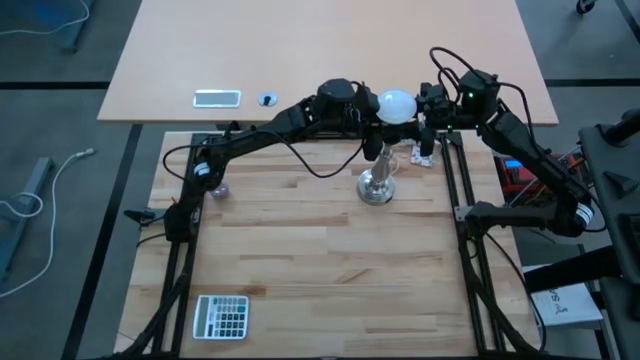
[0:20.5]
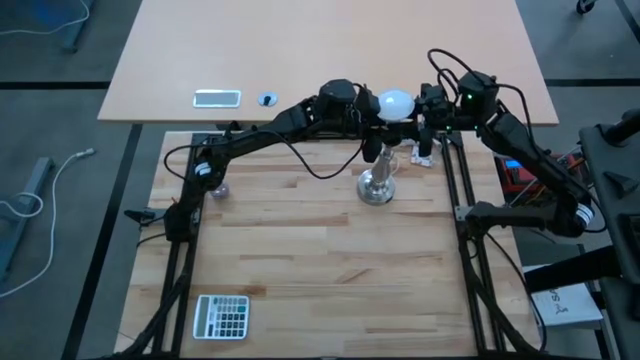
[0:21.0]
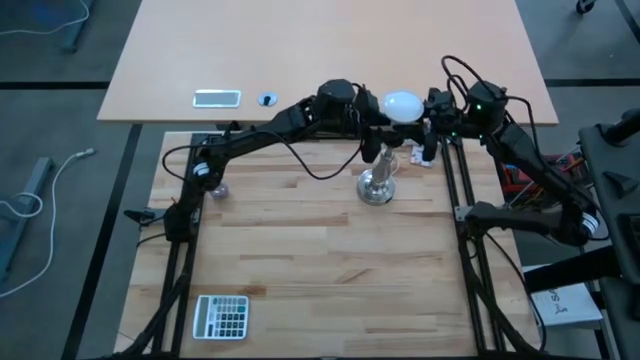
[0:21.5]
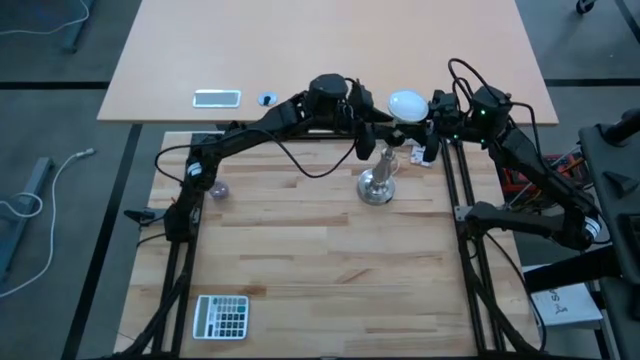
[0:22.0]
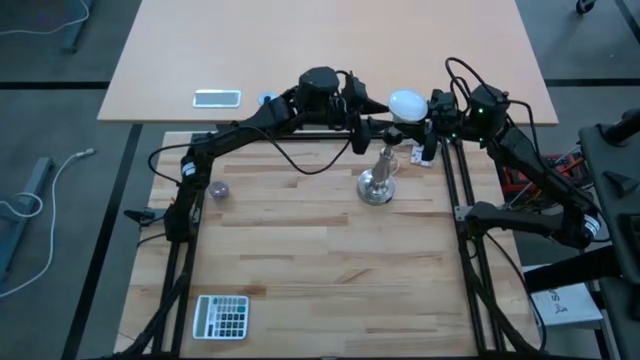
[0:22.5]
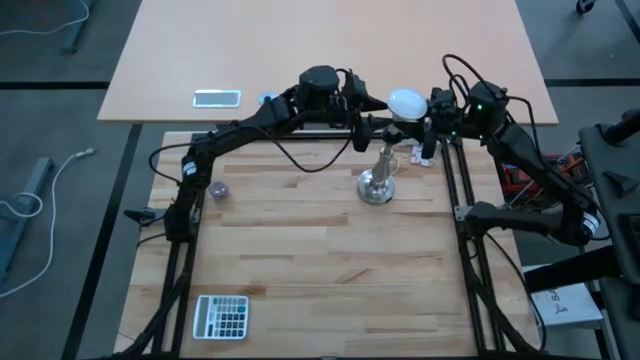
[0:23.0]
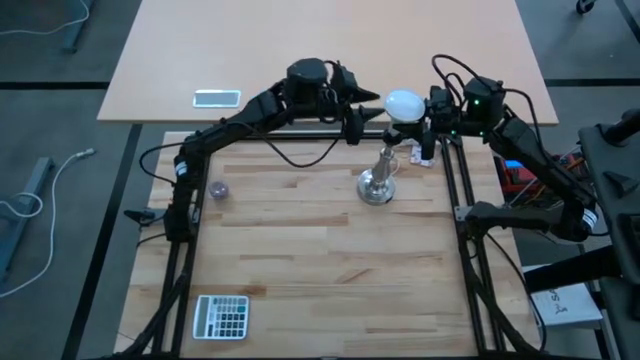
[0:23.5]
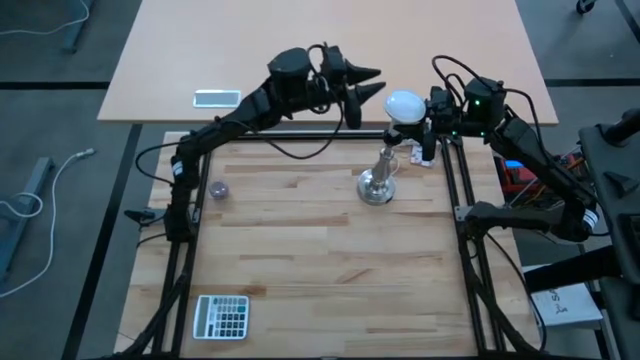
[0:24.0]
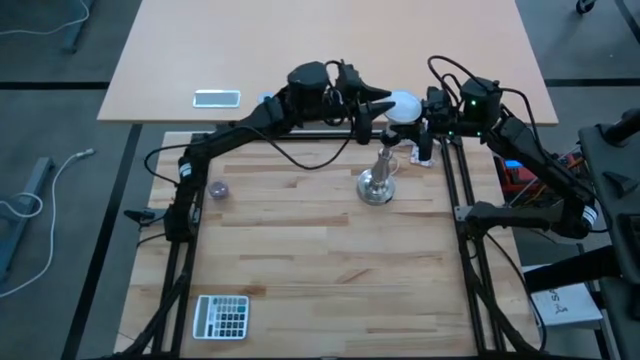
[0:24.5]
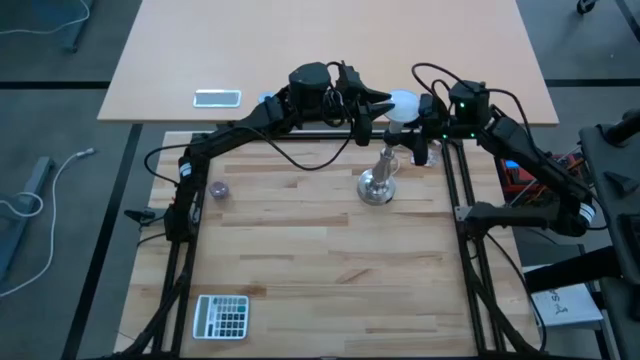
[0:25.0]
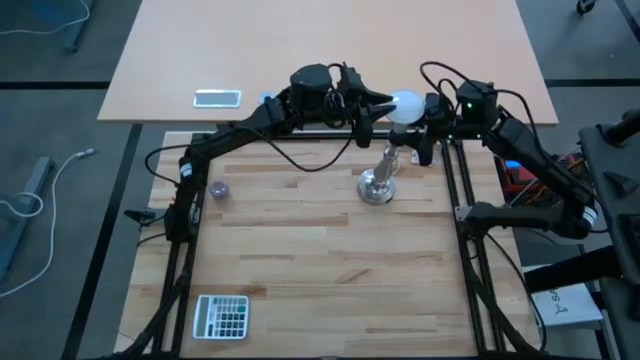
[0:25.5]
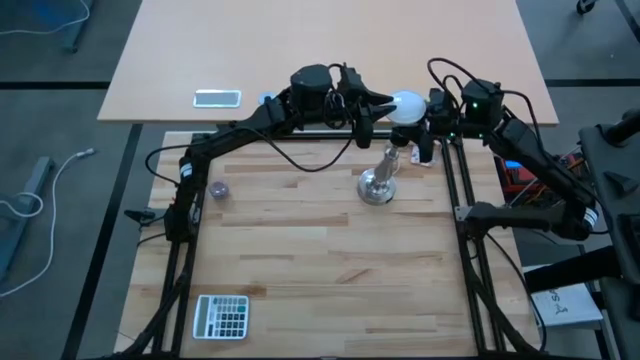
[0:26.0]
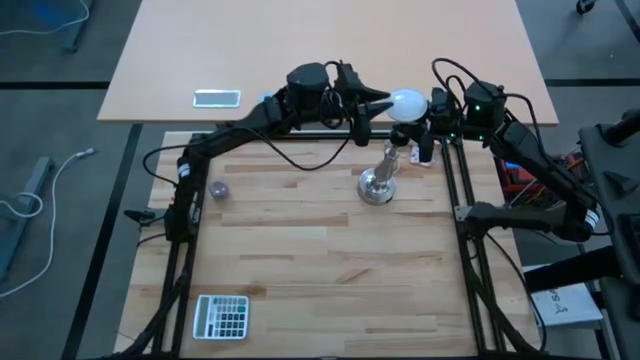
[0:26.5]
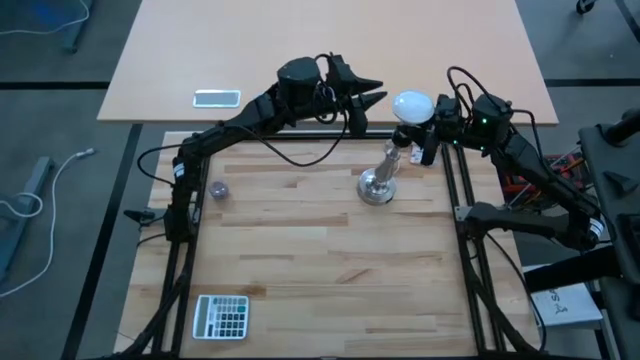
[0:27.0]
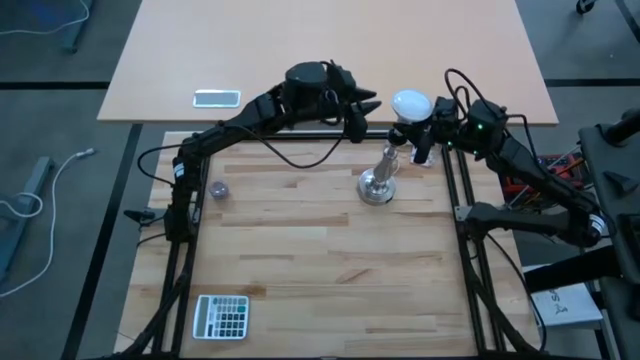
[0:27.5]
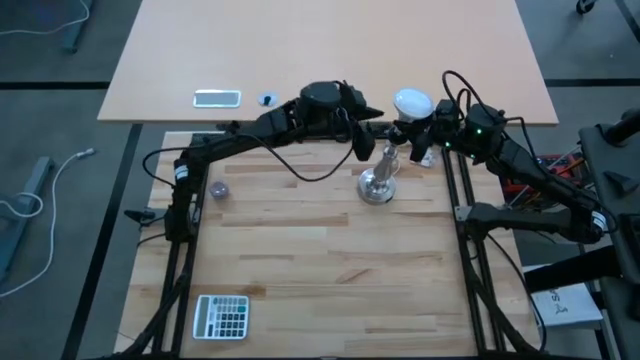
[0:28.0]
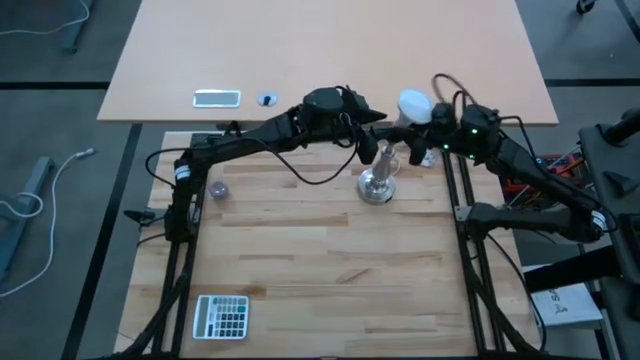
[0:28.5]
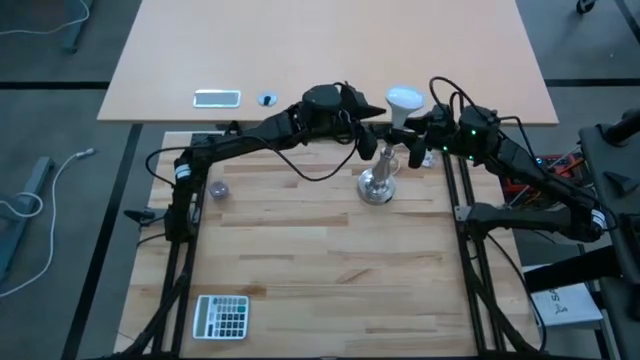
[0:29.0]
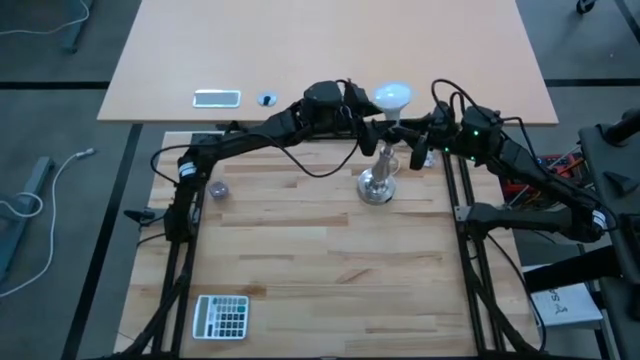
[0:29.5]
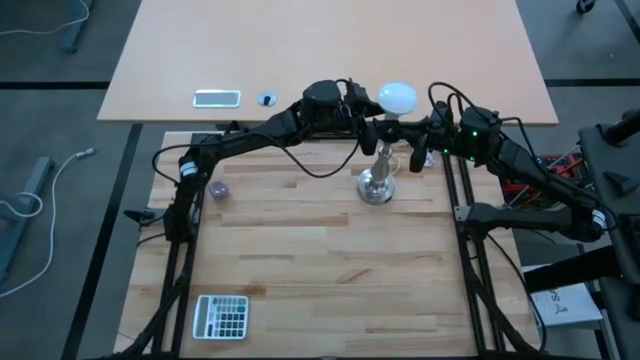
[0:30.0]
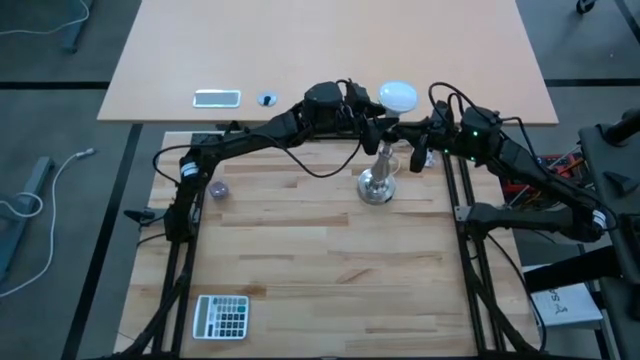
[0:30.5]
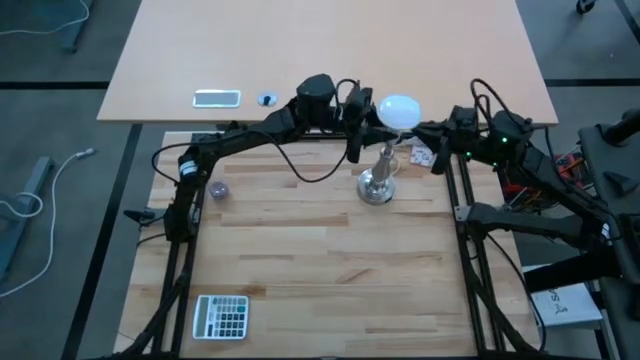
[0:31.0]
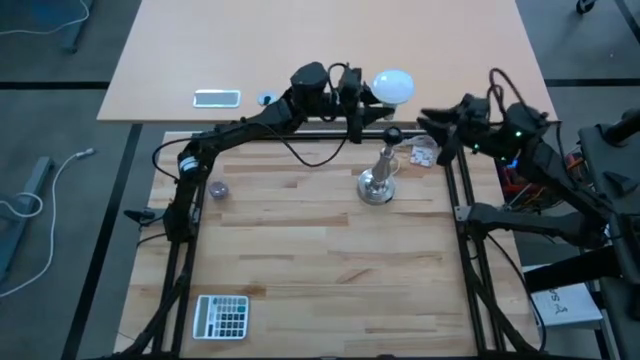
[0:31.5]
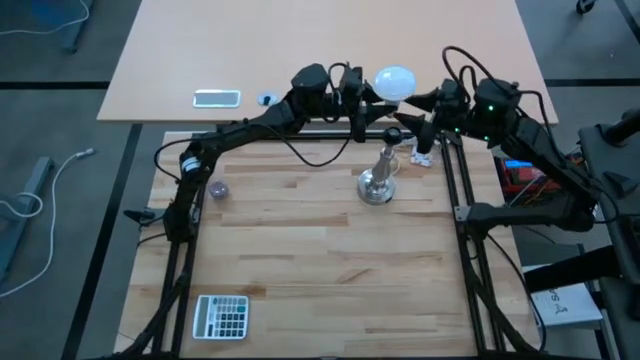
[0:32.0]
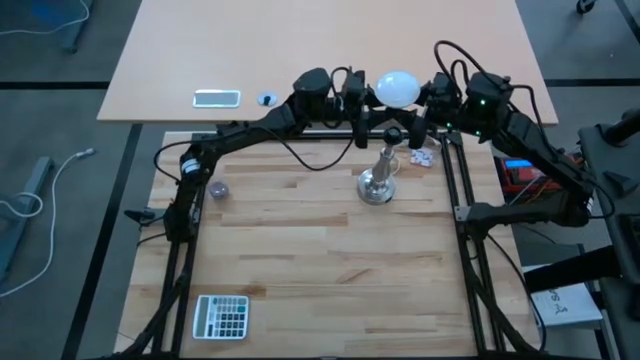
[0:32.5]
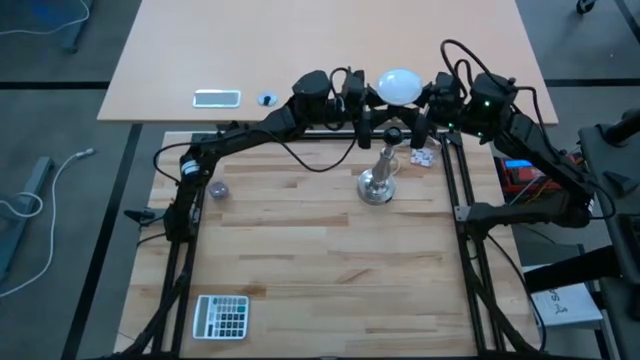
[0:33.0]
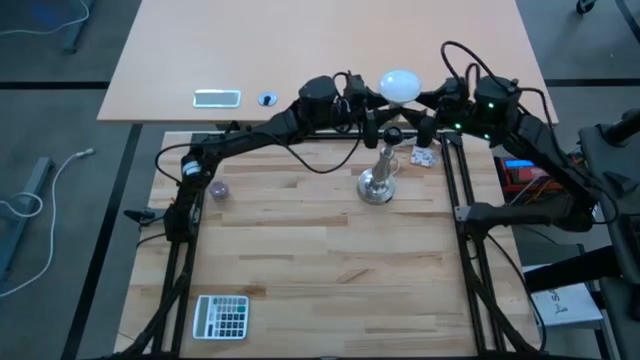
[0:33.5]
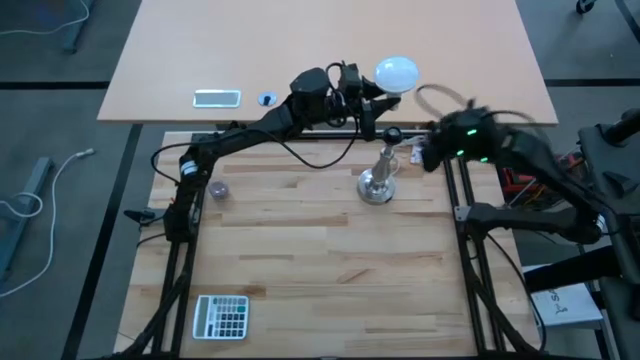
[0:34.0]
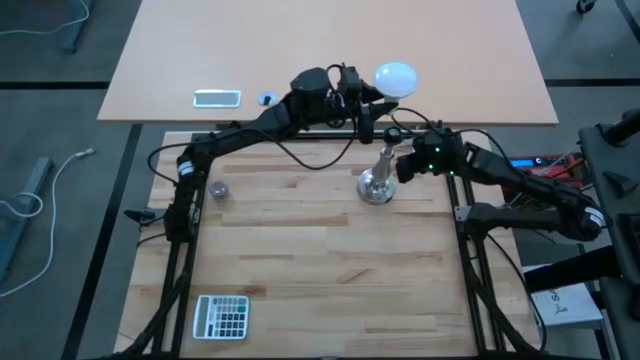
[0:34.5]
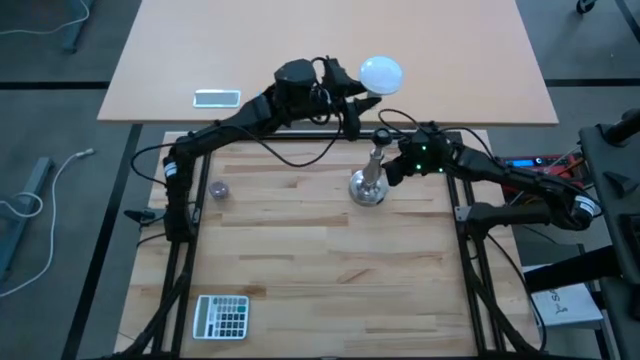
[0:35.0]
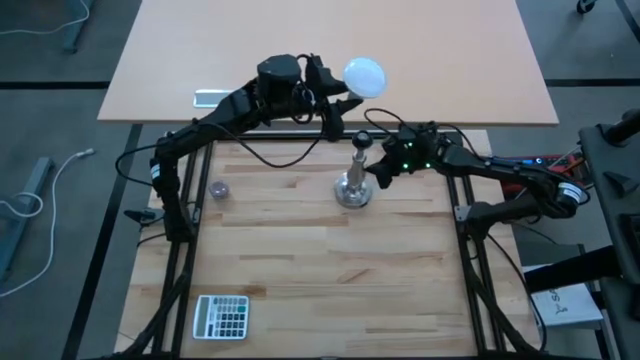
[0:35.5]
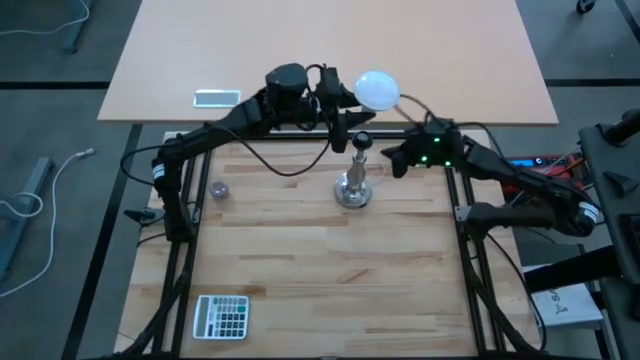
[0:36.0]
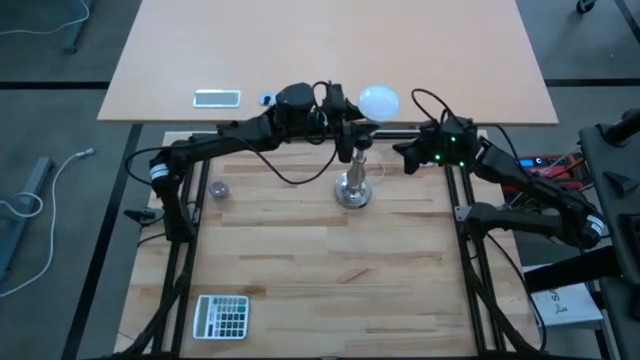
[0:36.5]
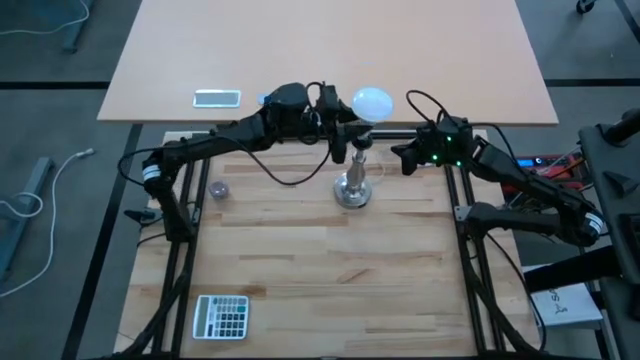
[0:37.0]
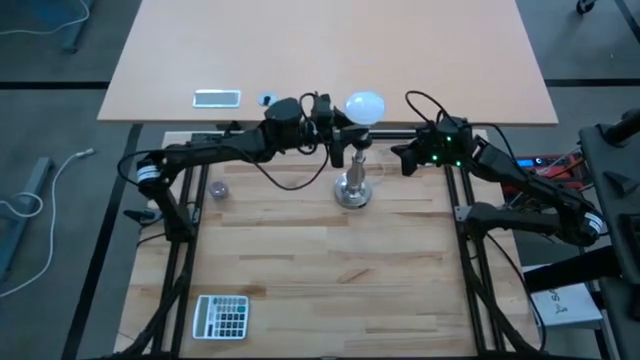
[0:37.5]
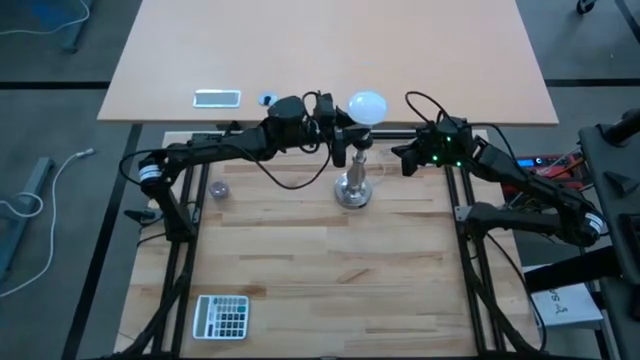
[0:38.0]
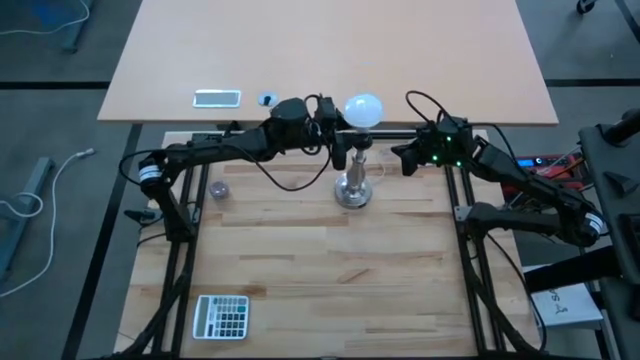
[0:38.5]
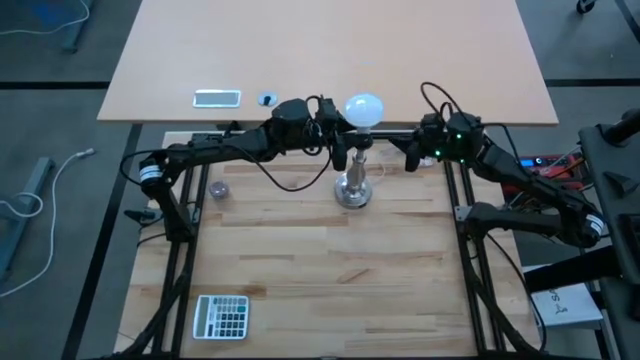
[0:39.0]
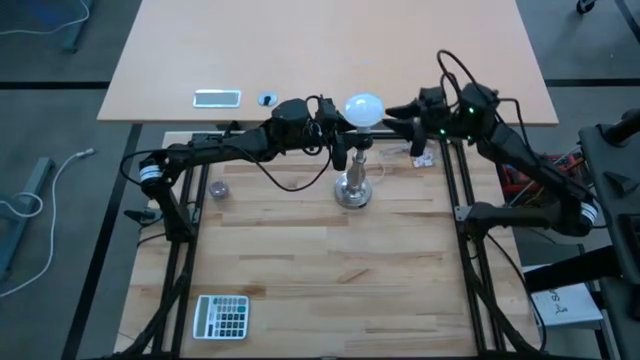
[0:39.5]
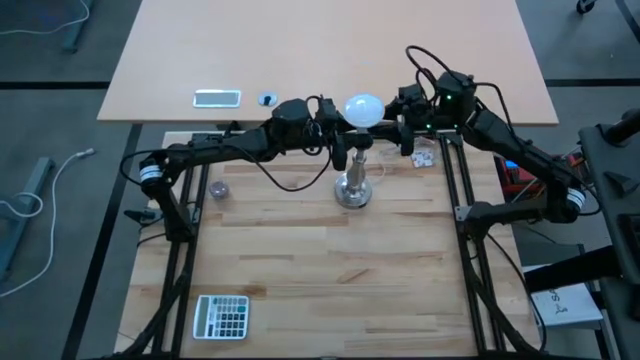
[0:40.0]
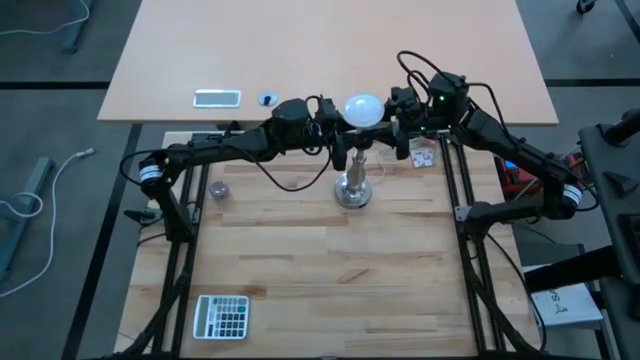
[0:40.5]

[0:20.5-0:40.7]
Task: Screw lightbulb
Insert the light bulb into the lamp
